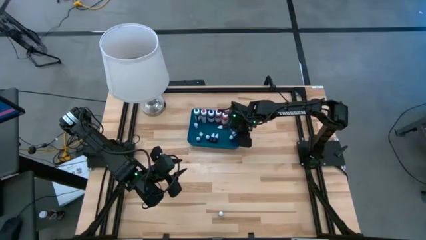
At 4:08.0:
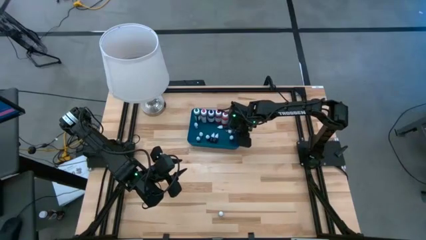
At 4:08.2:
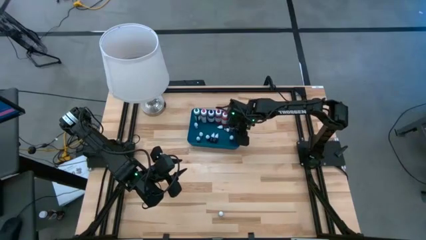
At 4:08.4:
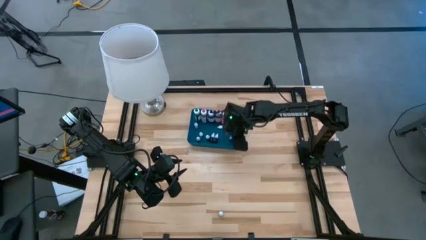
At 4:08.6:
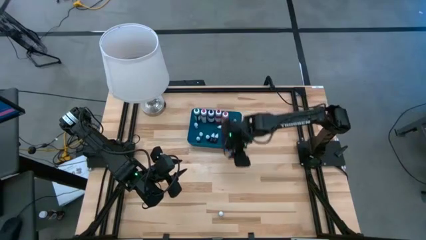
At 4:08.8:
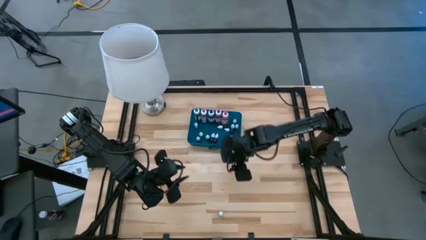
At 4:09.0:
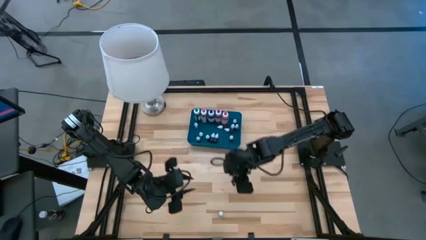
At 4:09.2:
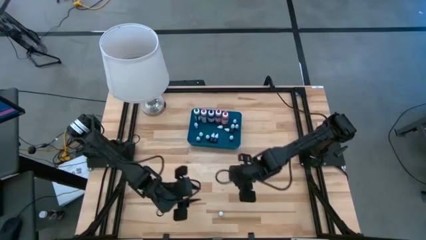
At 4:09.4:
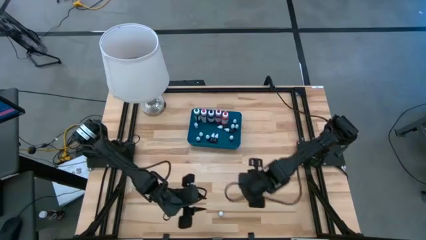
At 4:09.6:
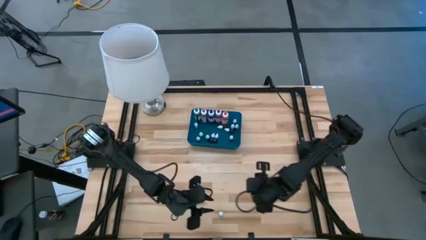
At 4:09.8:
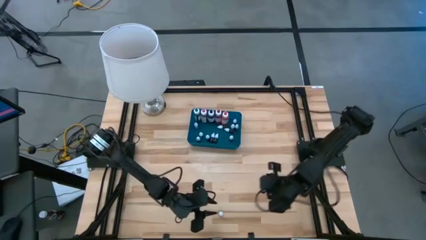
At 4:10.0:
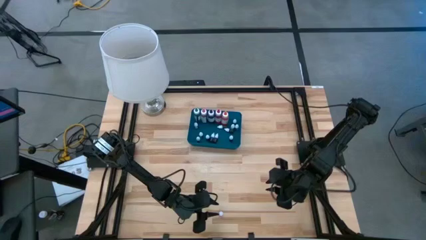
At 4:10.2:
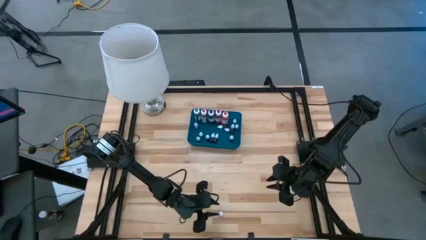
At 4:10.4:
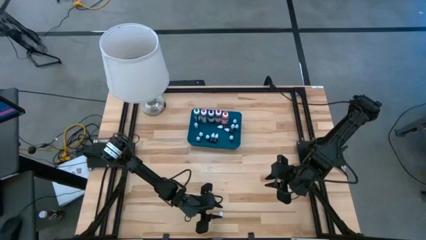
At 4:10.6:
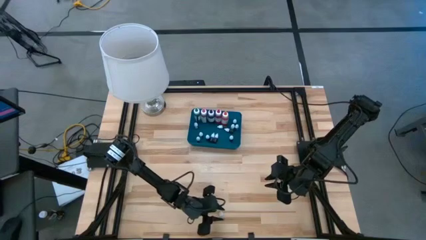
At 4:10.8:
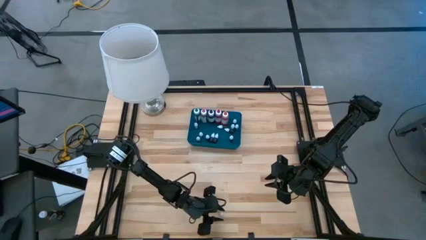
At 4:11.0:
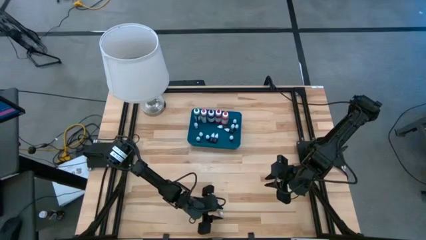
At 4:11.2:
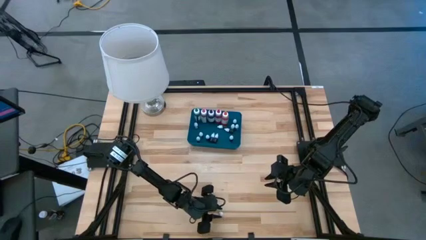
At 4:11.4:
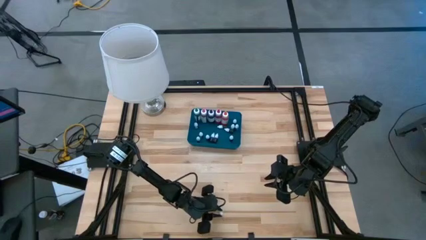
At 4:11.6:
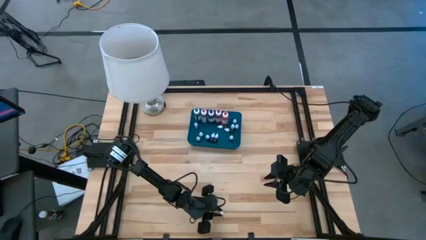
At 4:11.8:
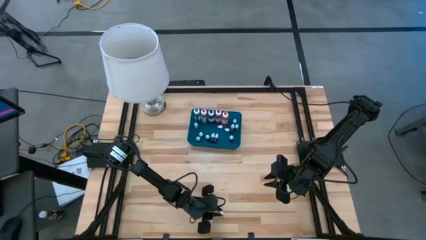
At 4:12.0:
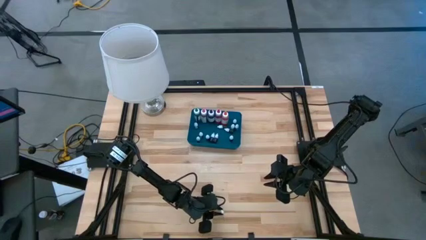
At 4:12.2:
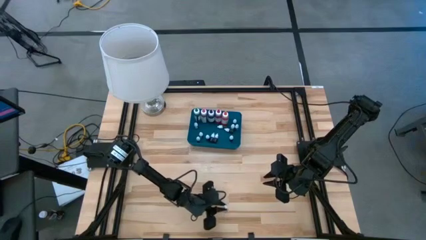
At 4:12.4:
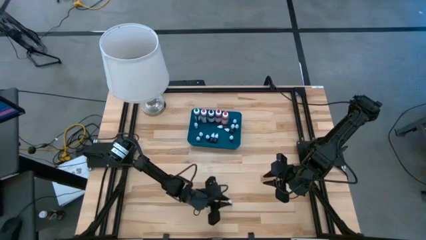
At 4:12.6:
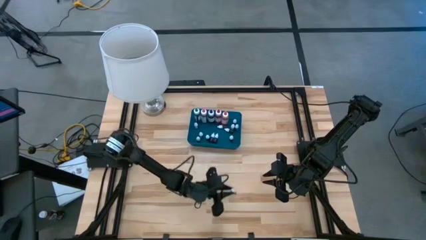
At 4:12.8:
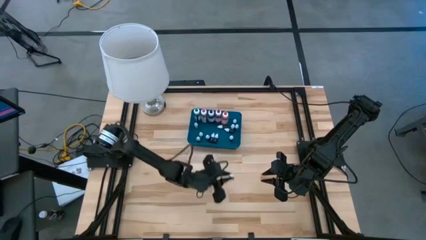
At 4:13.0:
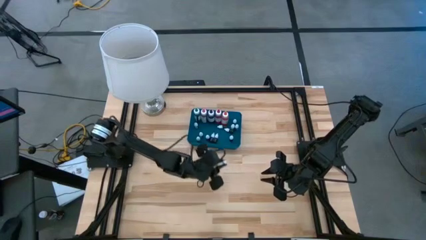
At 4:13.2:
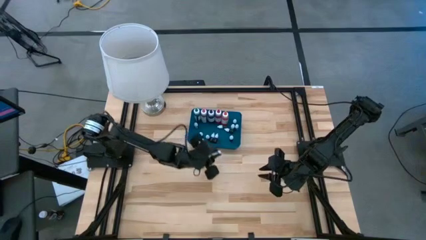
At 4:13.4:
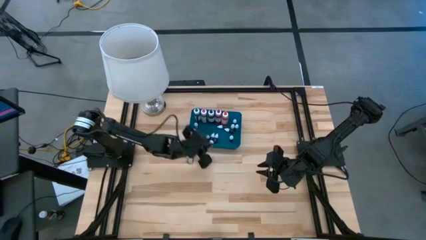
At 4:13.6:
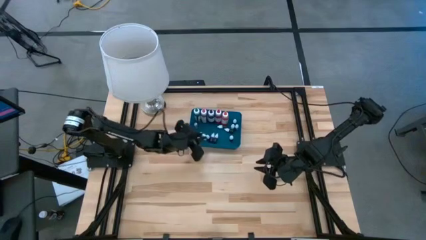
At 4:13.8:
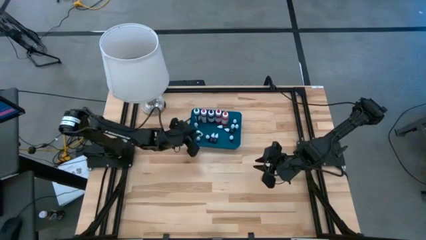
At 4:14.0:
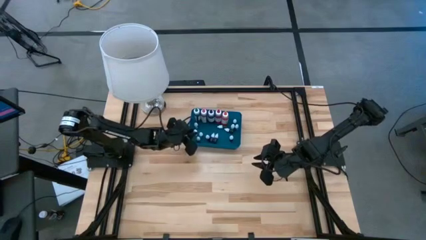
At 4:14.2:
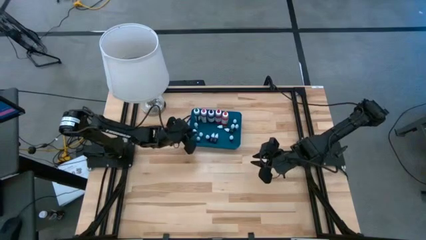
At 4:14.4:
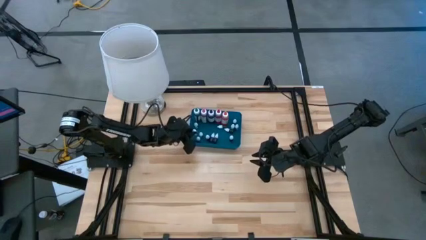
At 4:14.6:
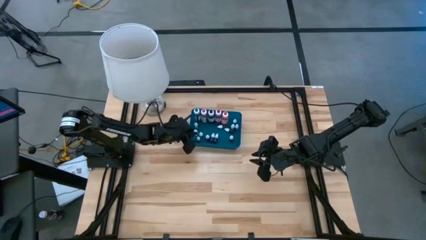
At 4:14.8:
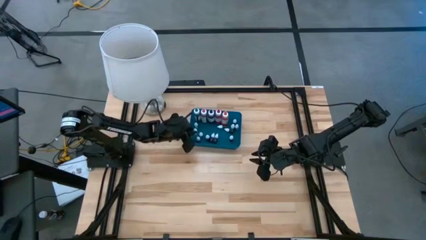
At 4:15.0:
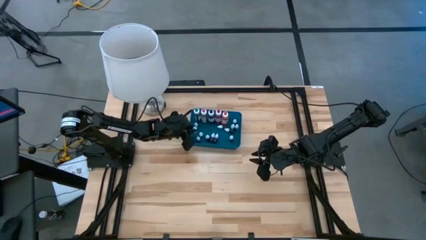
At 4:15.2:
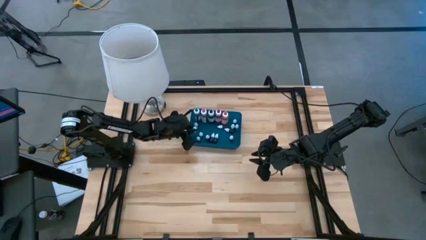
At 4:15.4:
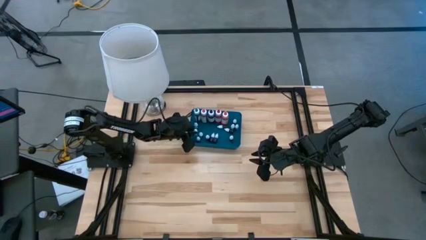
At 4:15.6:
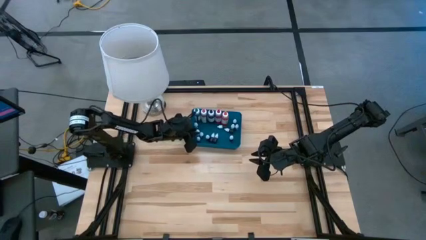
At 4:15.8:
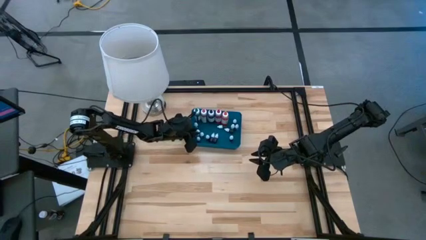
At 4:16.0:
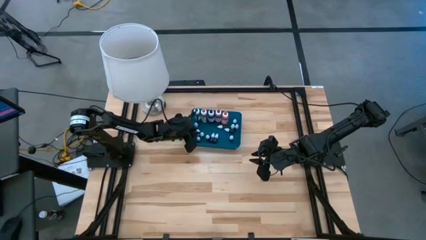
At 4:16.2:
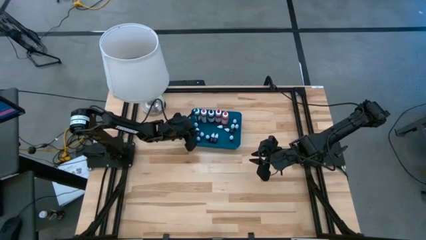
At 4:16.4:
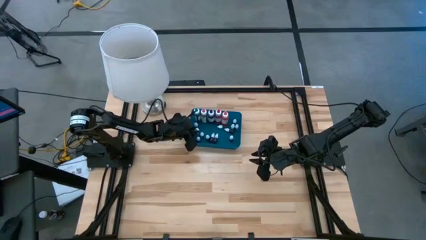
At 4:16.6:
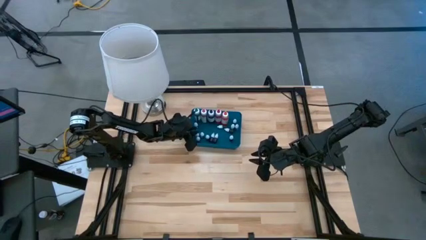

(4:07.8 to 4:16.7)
Task: Pick & Place food coloring
Put the small green food coloring bottle into the bin

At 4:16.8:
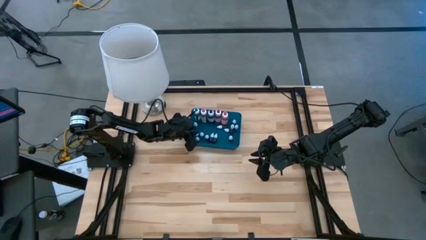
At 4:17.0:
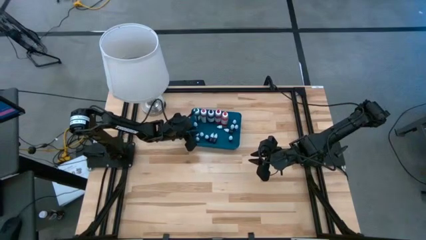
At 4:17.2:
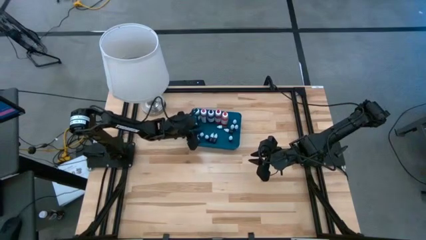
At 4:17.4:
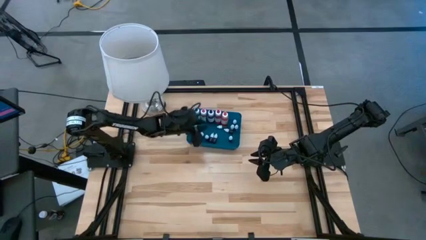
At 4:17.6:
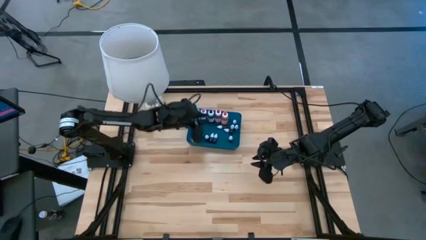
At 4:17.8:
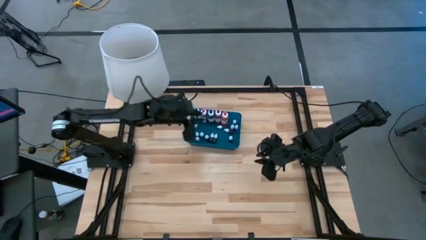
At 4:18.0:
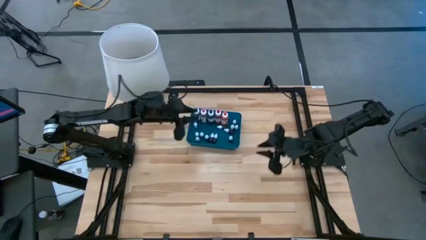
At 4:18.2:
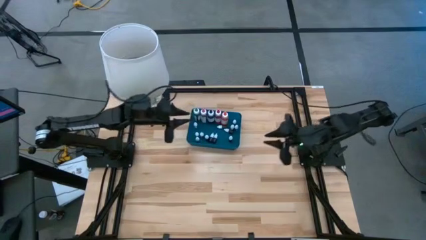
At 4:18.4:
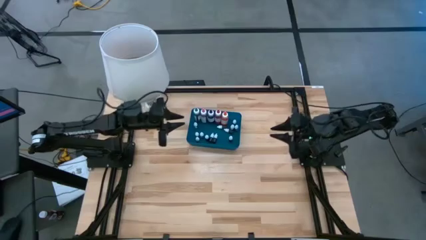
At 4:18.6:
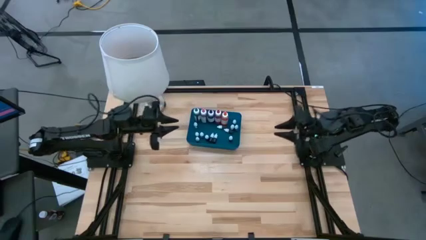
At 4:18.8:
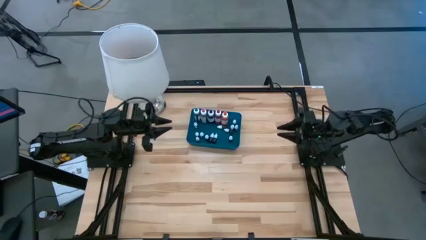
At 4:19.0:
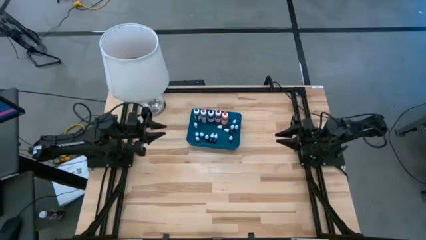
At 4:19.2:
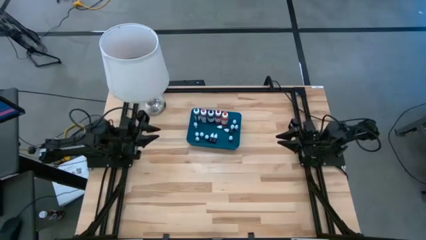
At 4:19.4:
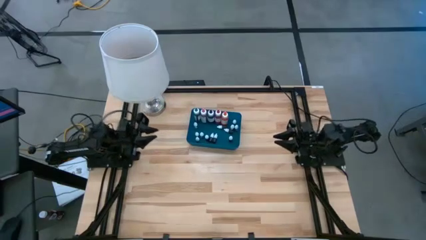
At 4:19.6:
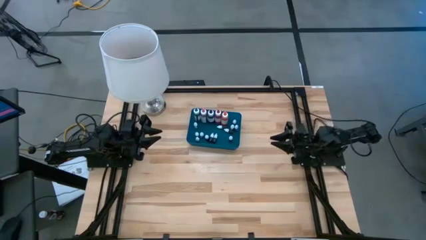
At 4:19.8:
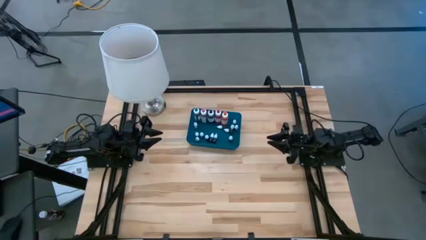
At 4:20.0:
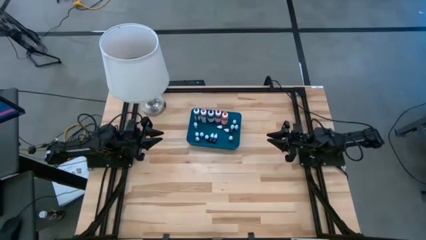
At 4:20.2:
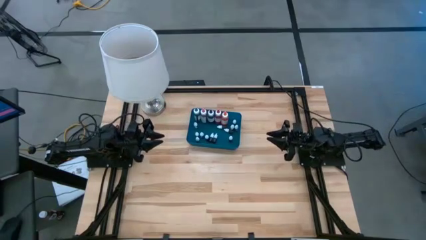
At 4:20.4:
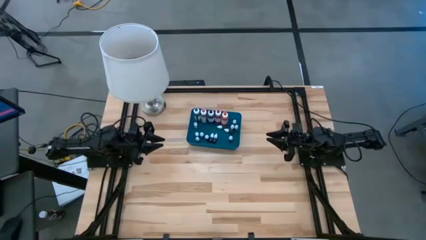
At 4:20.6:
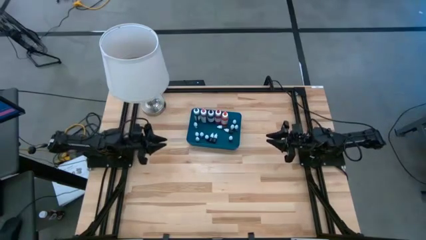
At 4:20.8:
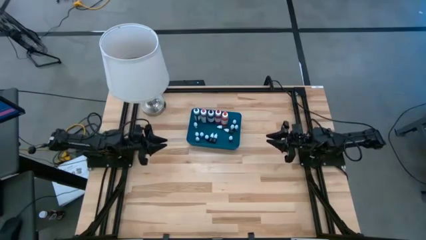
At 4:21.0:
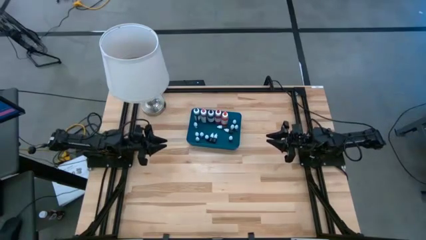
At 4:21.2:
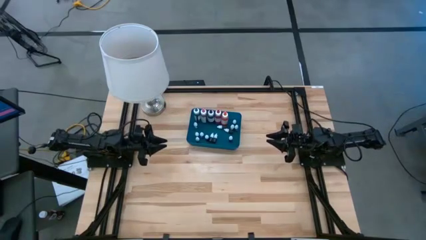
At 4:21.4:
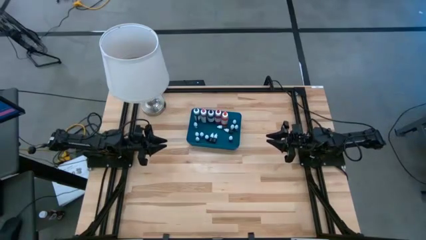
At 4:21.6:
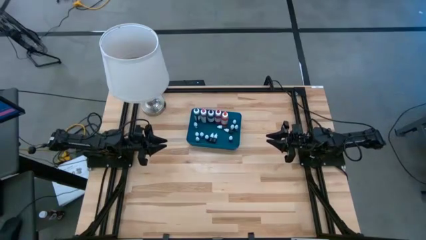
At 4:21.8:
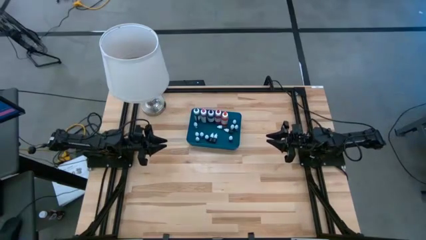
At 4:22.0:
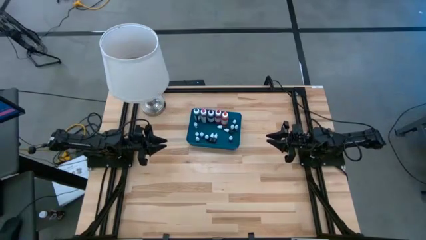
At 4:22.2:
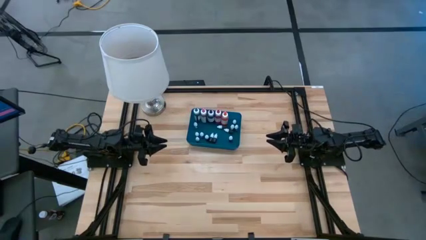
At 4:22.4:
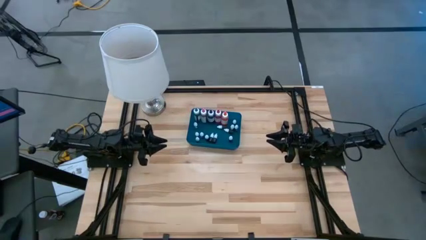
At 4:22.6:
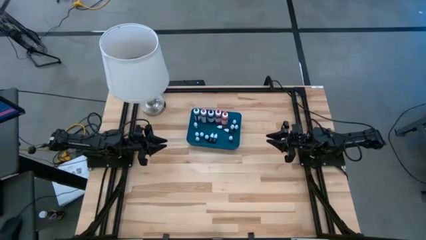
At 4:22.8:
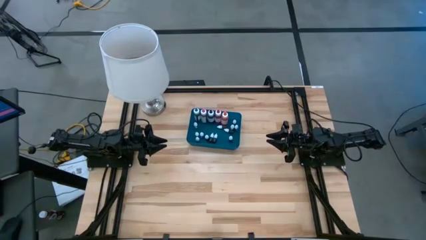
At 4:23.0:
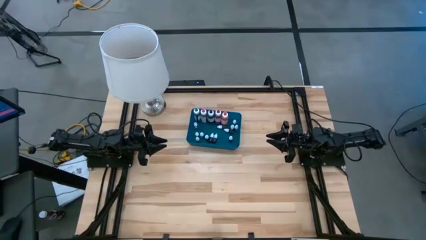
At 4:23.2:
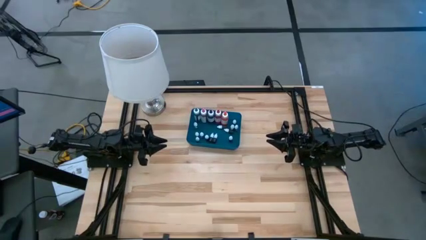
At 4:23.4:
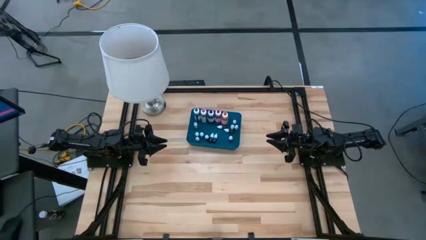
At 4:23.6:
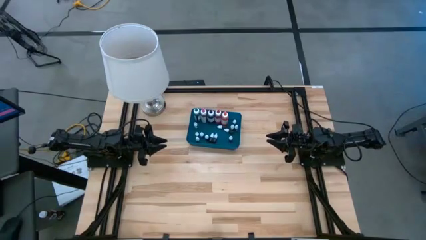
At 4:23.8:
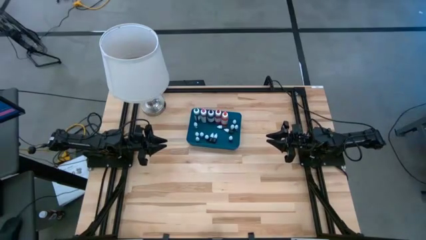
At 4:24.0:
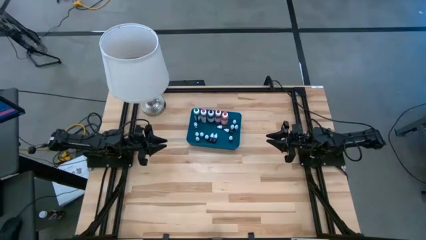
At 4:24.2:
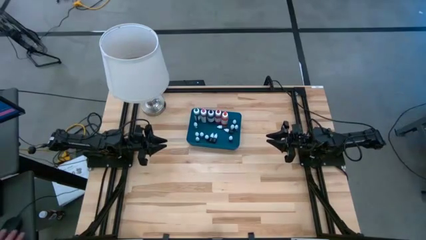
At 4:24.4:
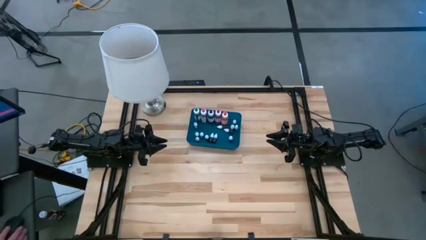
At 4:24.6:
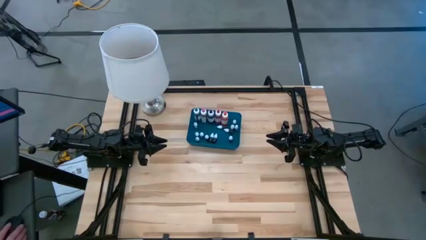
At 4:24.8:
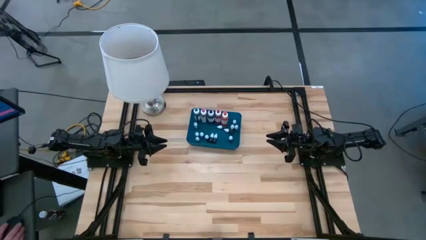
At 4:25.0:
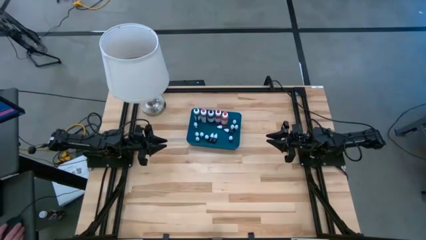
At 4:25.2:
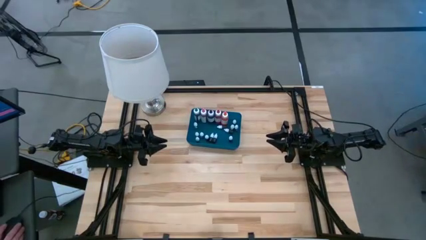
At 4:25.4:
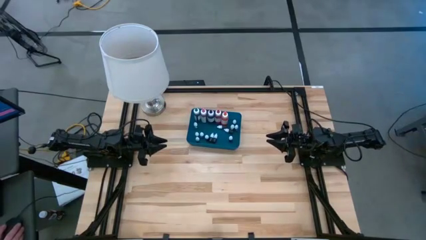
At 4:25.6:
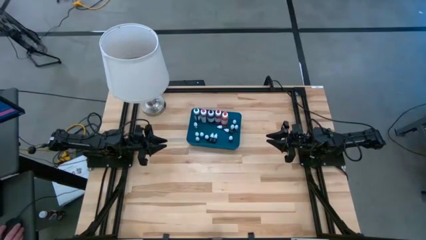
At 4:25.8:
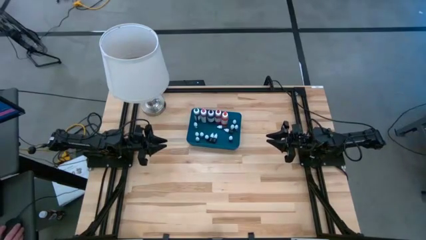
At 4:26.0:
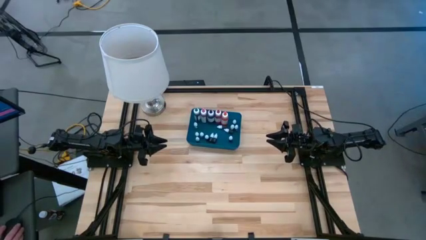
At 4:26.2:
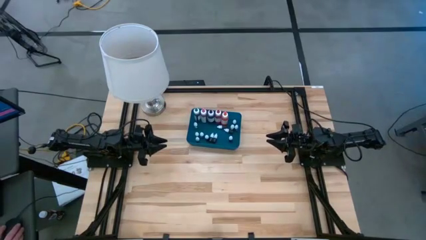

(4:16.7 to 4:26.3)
Return to Home Position
